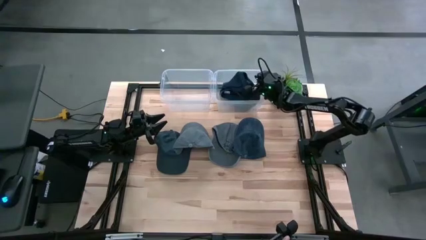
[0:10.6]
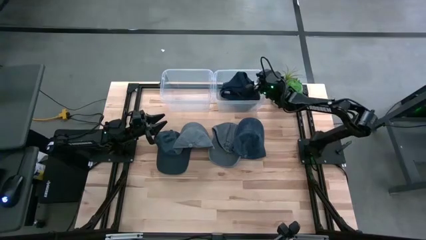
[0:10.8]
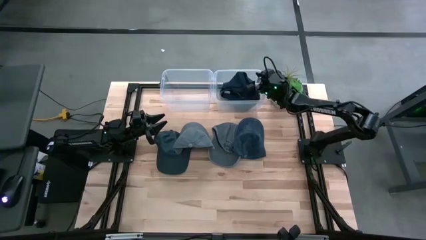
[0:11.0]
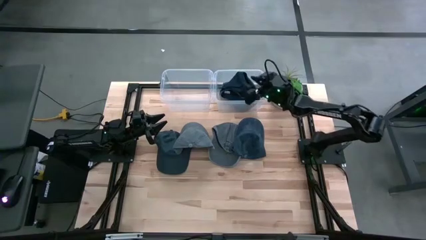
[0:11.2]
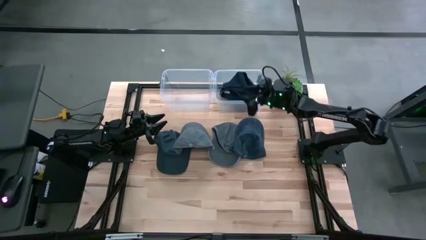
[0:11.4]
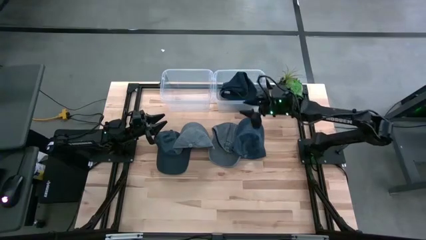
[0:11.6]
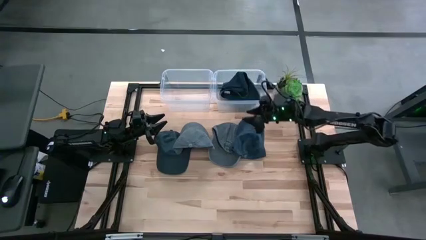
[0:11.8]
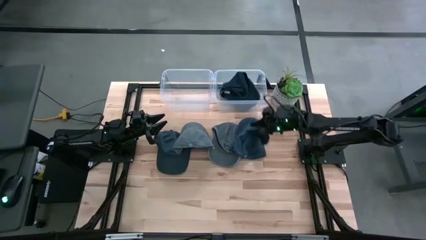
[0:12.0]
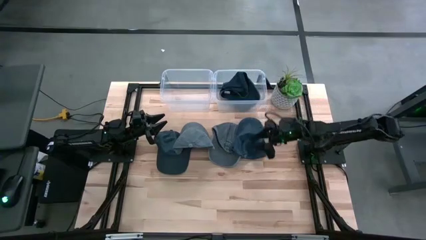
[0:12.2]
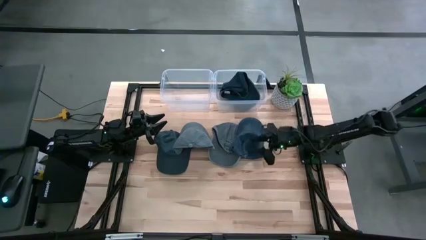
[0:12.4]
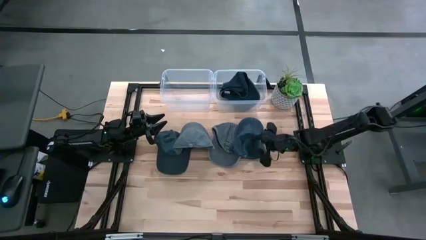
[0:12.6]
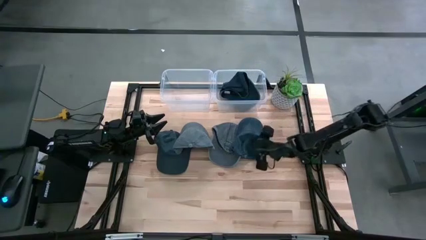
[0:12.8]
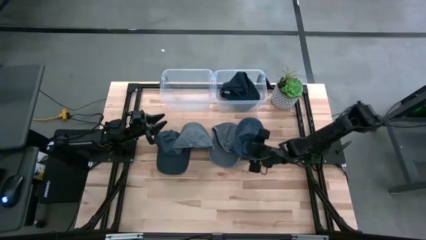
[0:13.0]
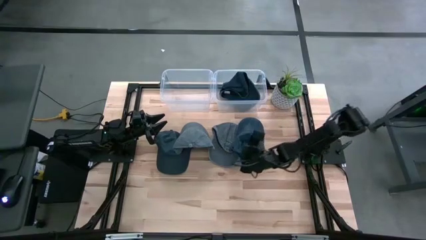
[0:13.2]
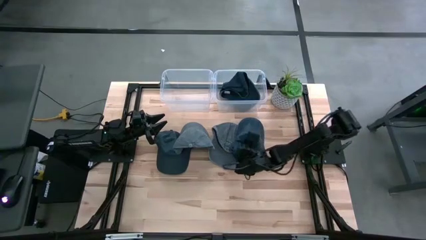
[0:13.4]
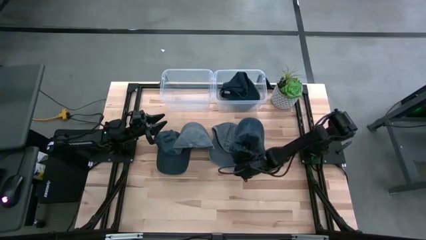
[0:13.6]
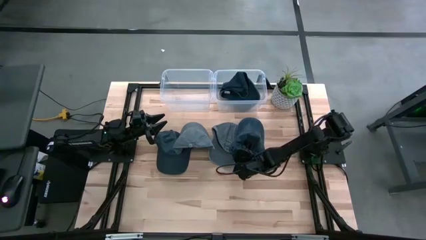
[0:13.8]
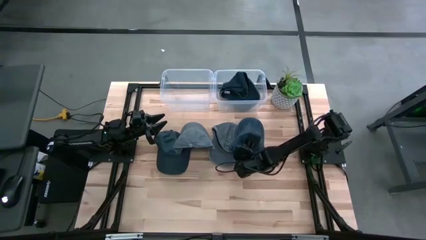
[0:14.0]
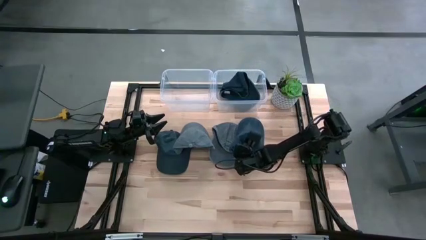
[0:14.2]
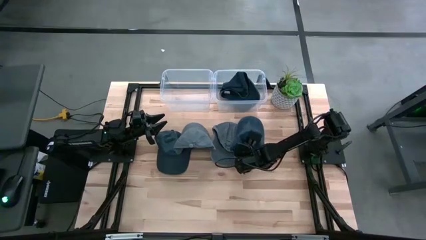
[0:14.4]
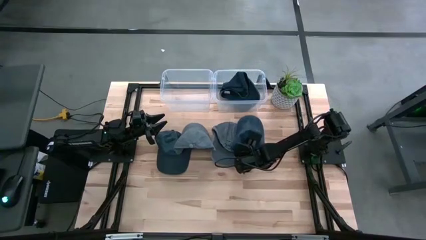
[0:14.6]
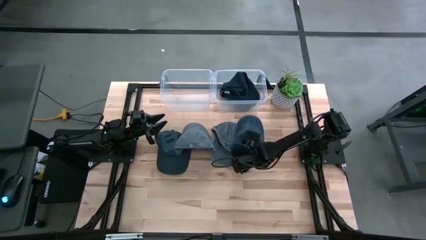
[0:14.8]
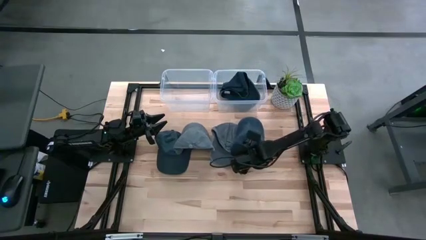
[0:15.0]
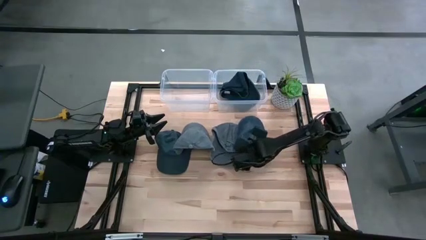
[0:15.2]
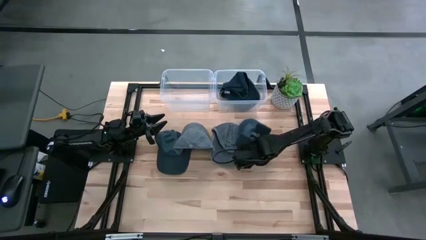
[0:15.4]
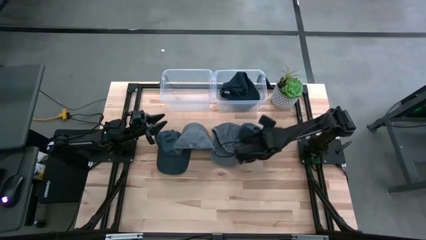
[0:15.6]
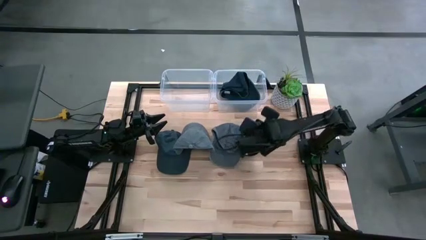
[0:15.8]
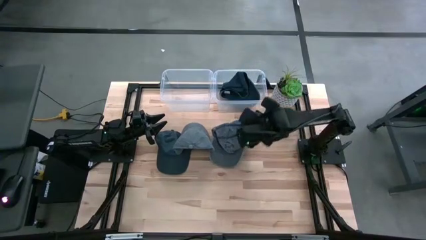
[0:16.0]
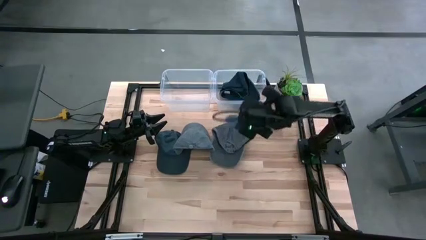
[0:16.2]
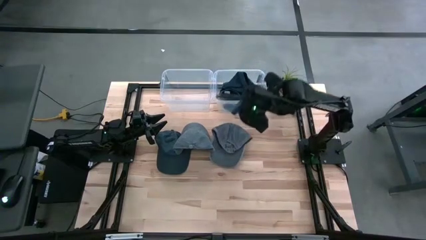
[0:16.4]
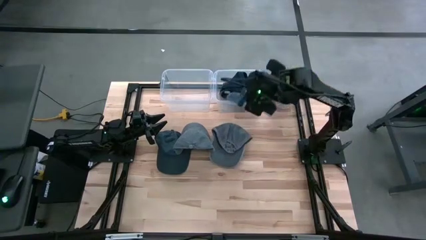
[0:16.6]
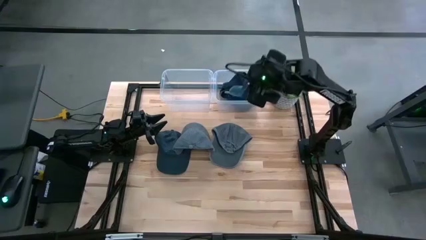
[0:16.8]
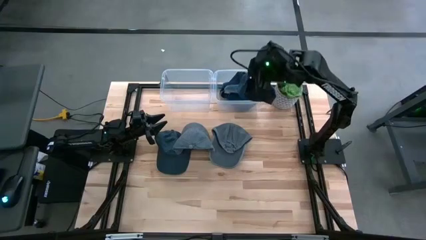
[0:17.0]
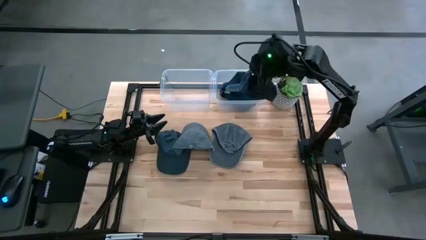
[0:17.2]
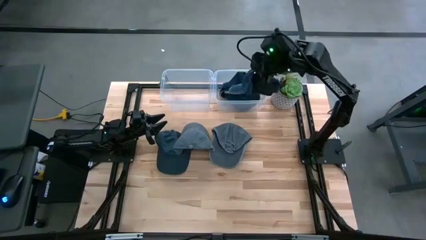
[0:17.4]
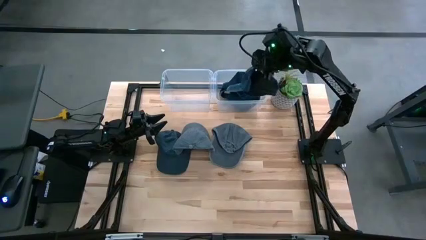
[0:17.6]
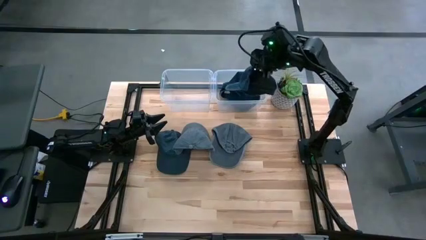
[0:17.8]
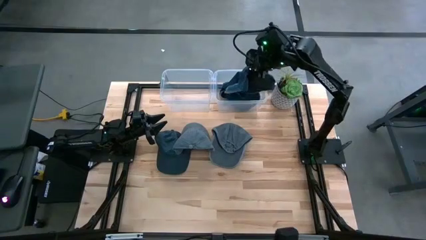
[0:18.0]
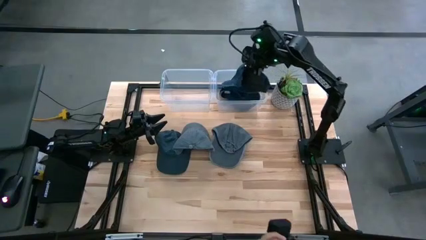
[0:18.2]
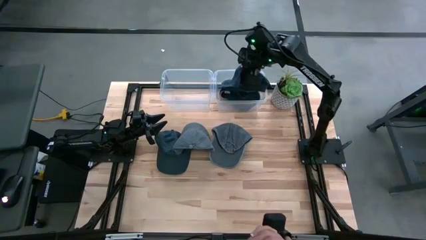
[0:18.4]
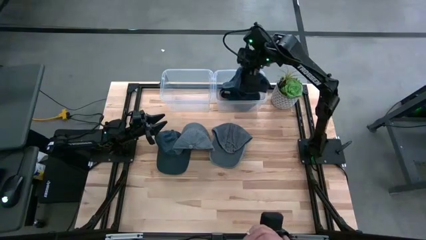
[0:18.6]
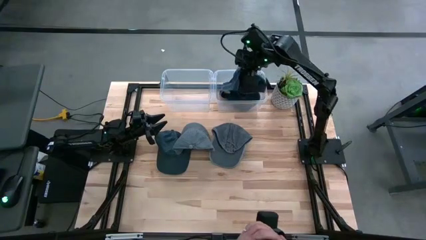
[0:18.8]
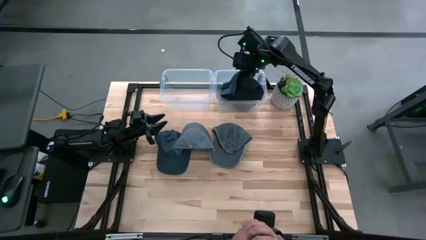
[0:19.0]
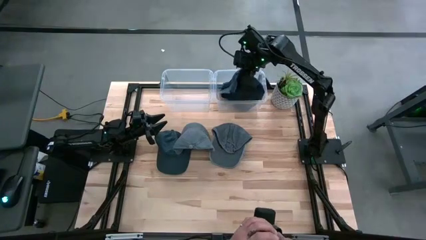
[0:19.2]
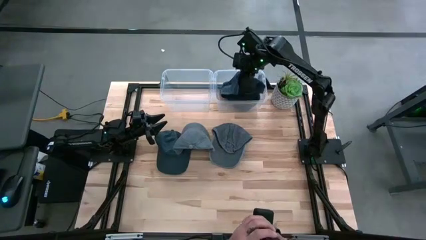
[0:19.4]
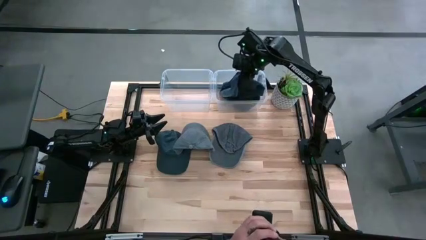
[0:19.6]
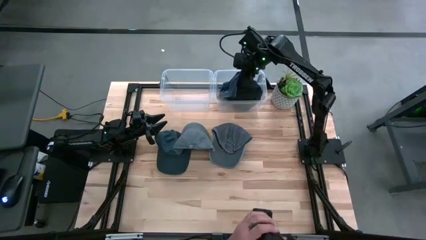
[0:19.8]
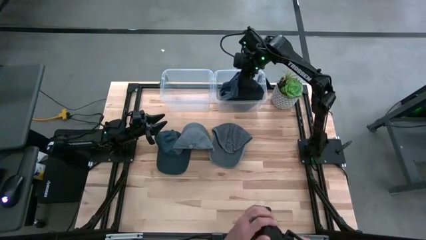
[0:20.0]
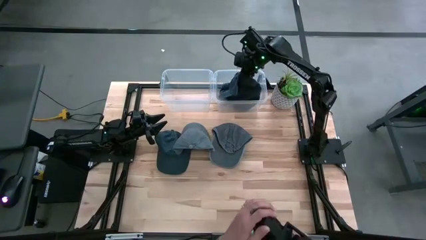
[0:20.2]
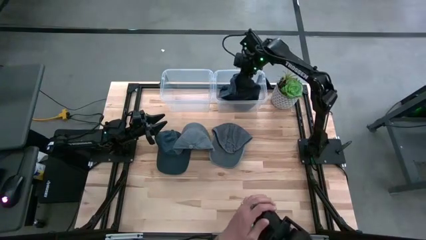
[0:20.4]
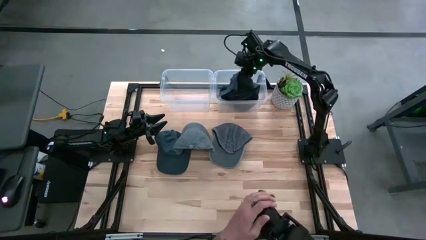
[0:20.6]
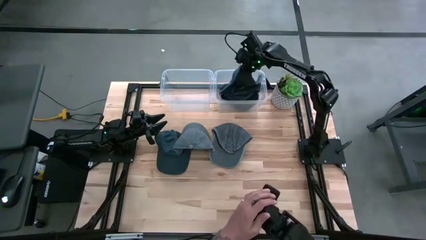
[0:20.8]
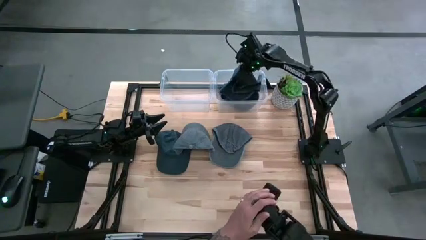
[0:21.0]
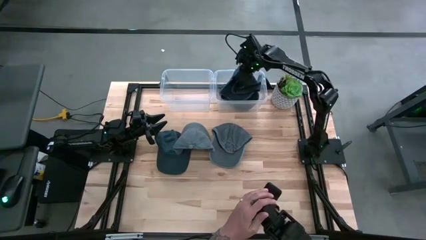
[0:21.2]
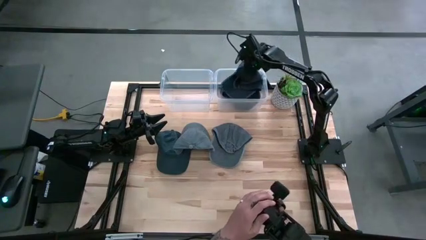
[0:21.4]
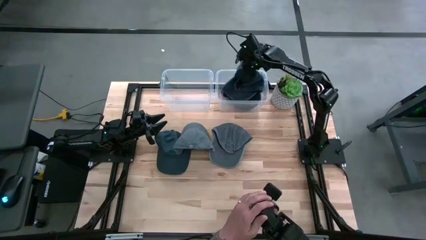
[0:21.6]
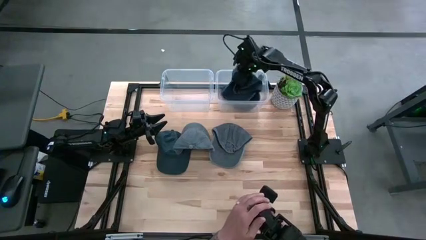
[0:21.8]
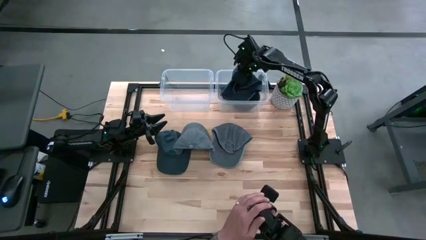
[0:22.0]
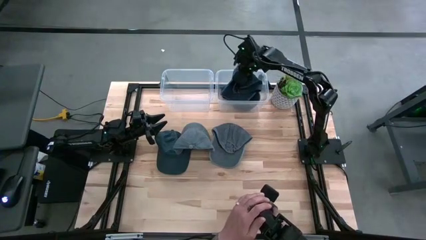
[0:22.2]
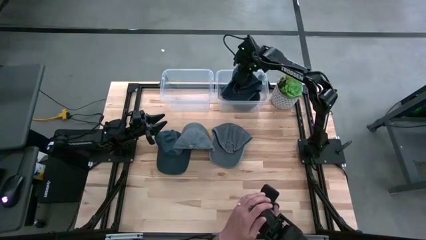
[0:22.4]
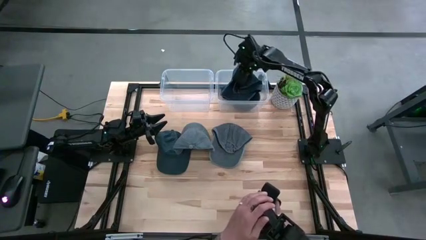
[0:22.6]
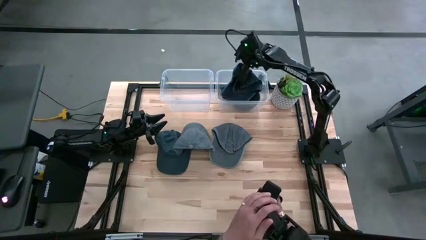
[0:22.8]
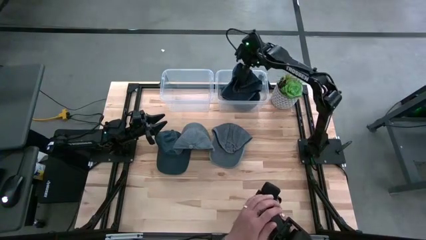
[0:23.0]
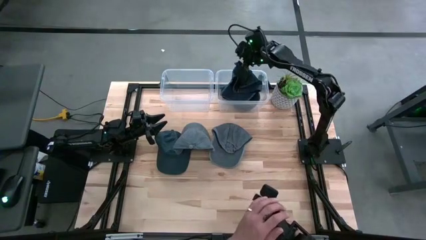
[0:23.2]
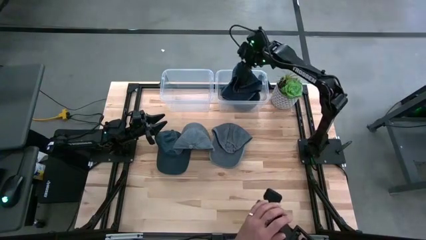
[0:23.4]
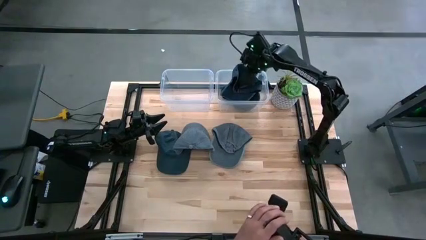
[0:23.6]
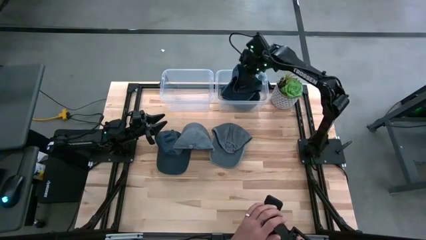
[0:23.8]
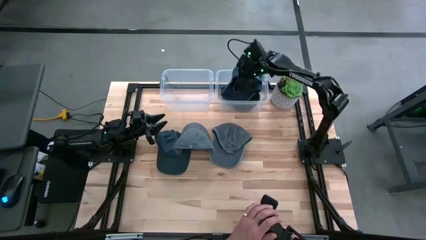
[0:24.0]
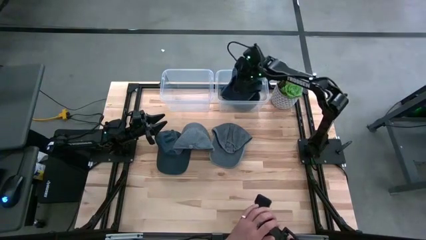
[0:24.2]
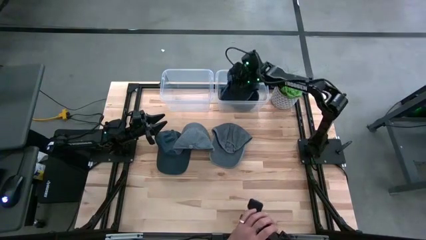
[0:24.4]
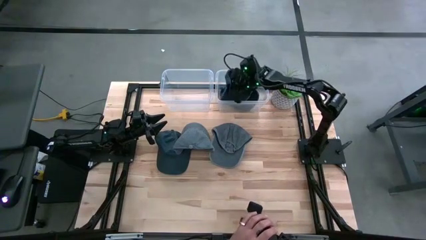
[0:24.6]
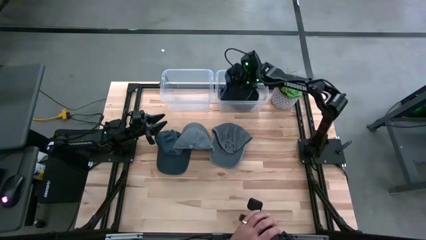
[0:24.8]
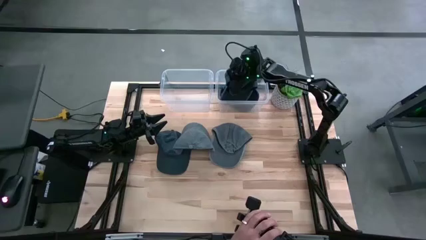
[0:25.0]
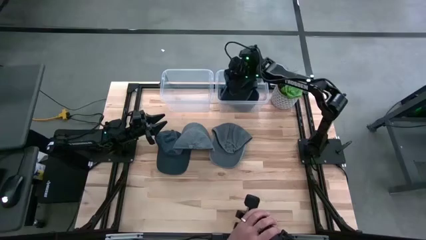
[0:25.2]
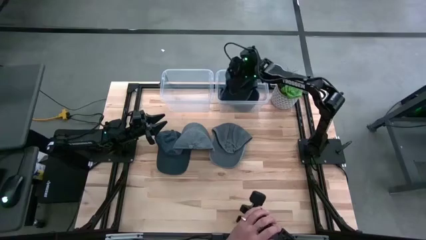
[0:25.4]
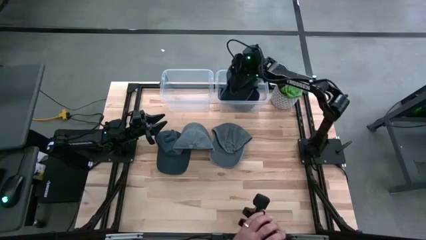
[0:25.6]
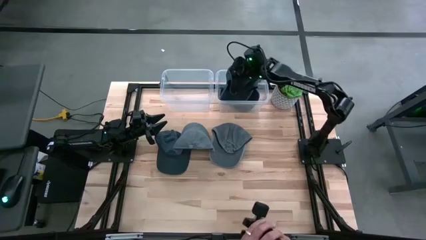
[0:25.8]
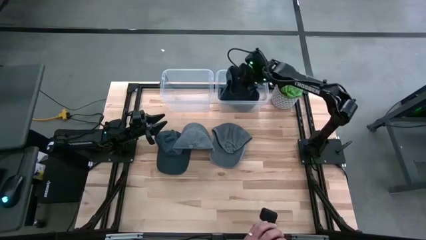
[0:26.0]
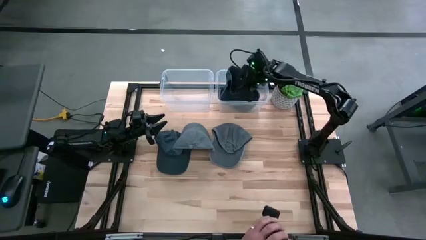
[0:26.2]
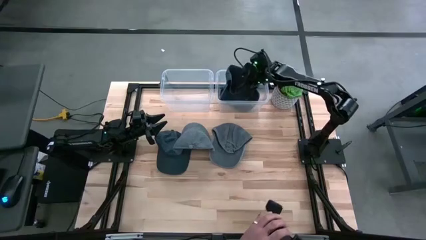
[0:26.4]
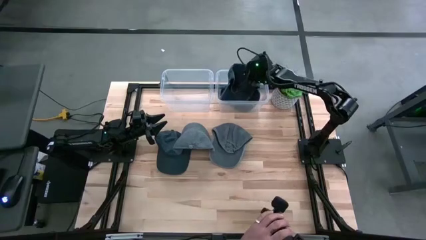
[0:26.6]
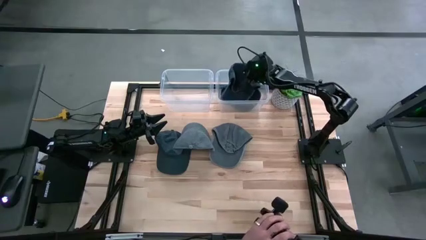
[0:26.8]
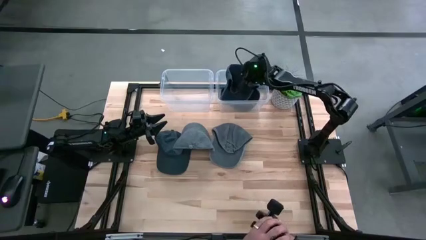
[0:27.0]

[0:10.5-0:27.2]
Task: Pick & Place hat
Put the right blue cap into the right transparent bin
